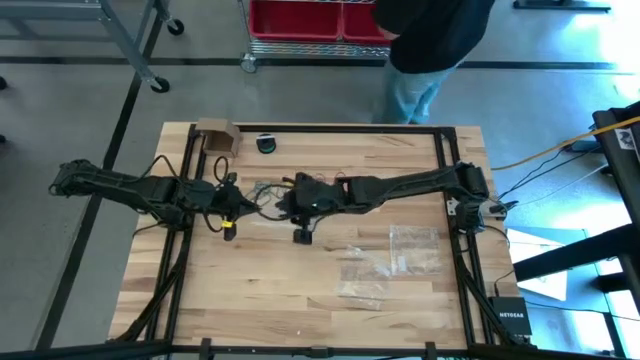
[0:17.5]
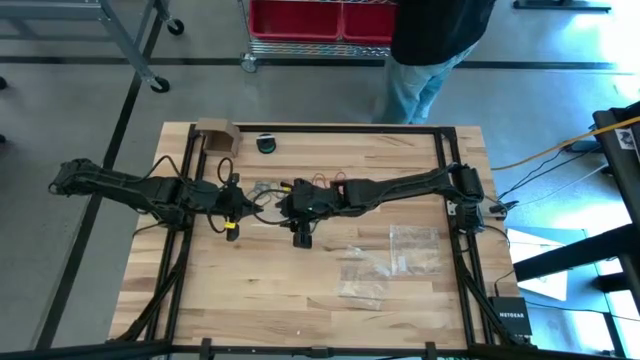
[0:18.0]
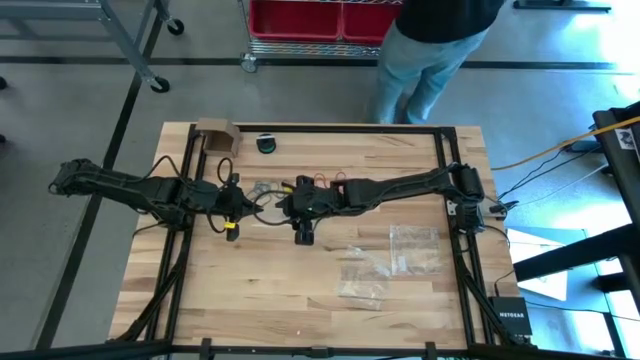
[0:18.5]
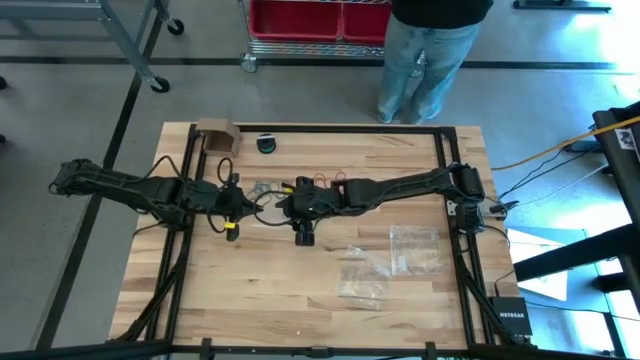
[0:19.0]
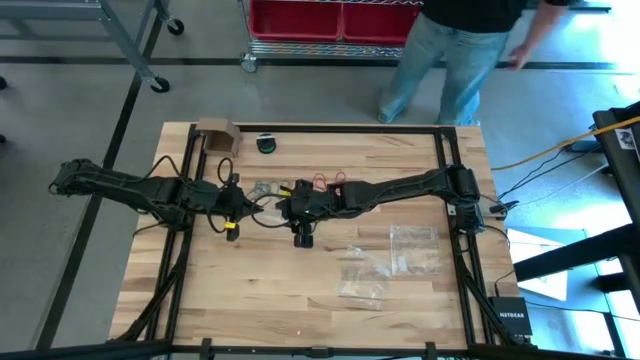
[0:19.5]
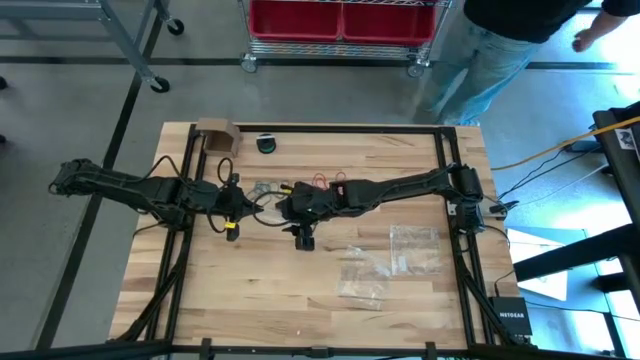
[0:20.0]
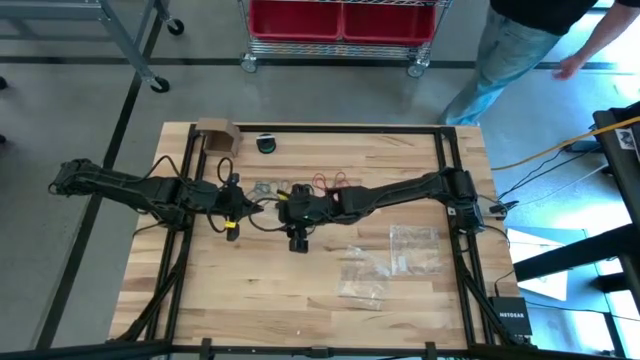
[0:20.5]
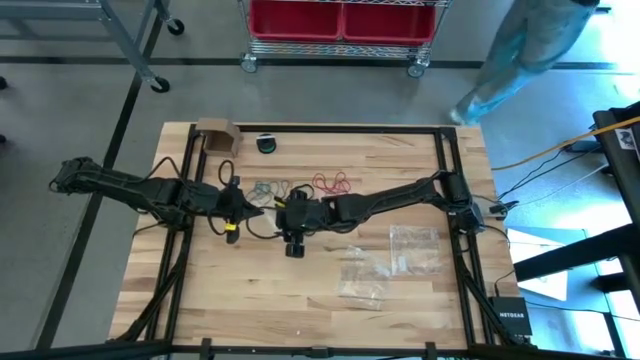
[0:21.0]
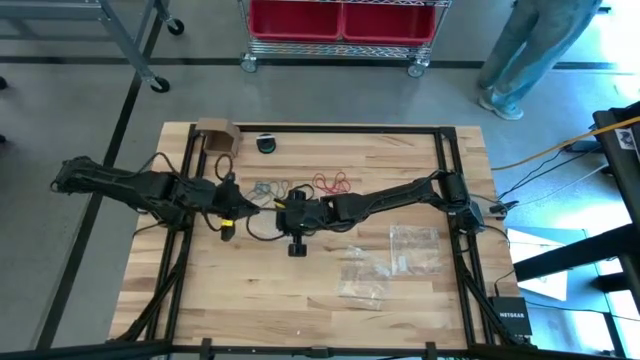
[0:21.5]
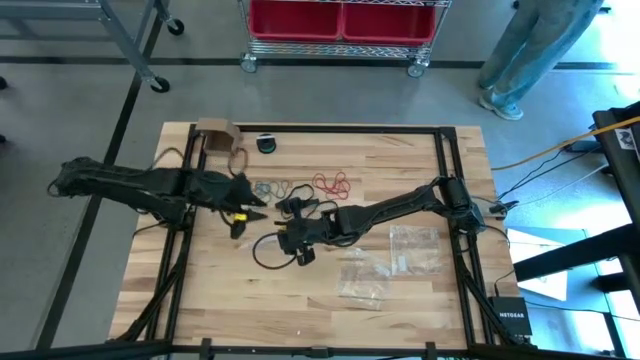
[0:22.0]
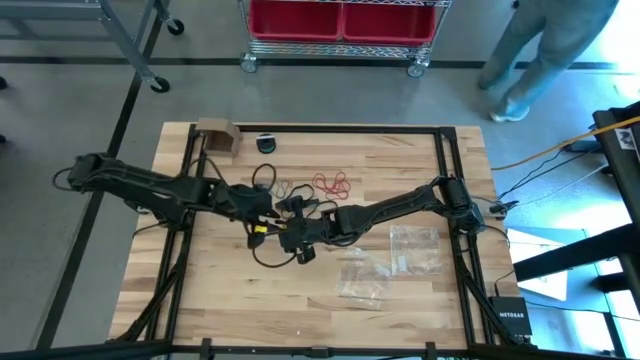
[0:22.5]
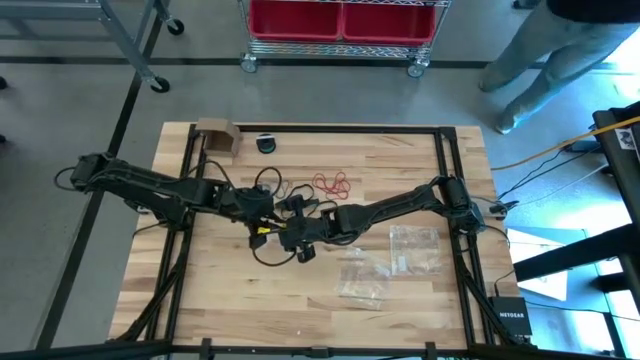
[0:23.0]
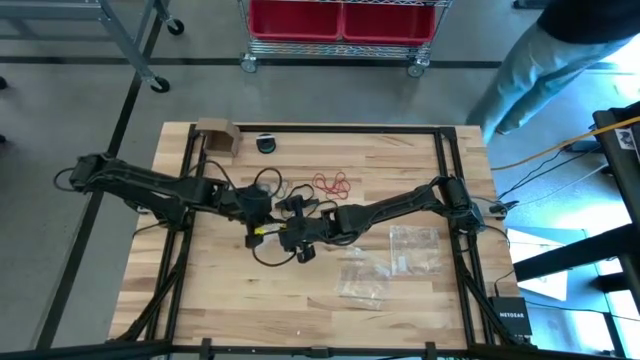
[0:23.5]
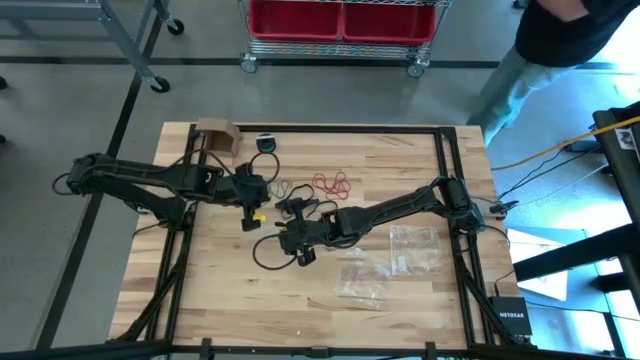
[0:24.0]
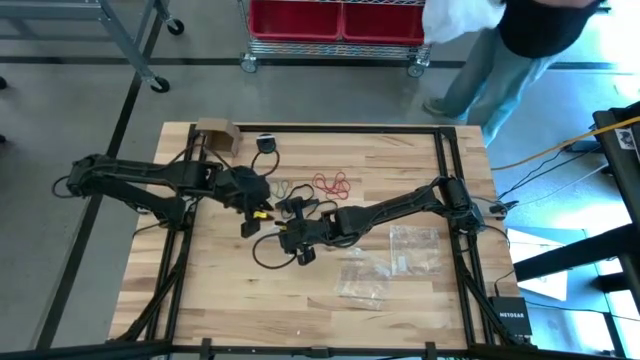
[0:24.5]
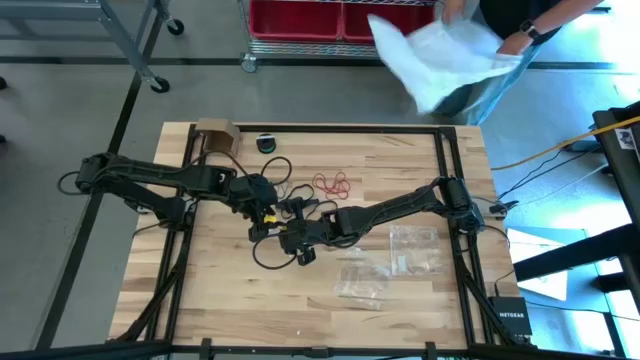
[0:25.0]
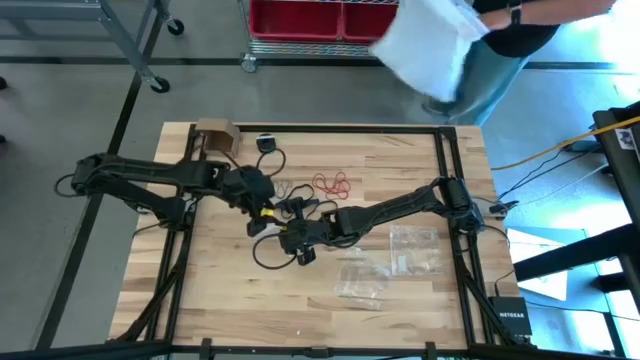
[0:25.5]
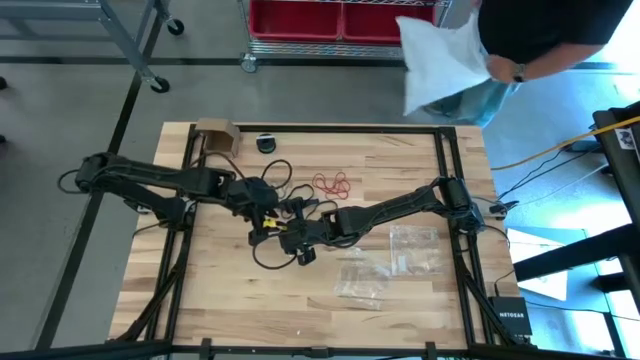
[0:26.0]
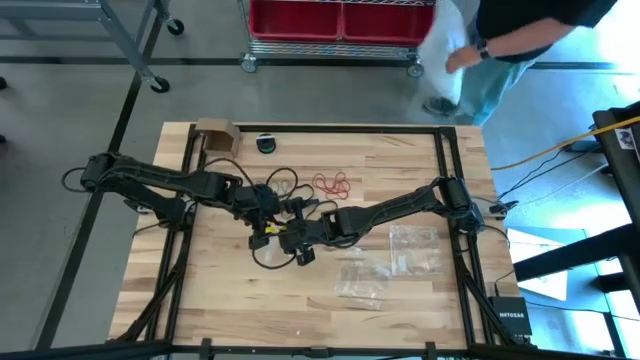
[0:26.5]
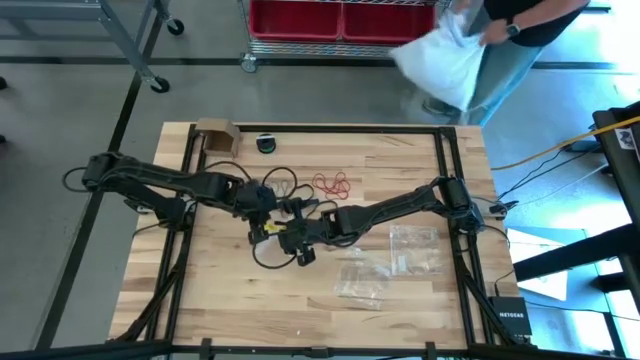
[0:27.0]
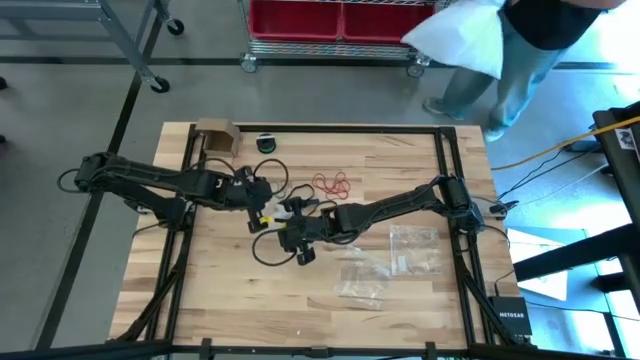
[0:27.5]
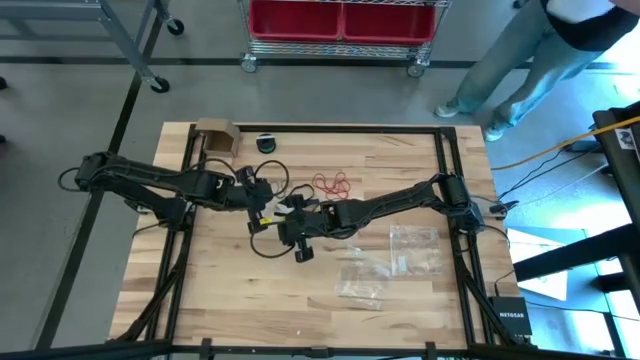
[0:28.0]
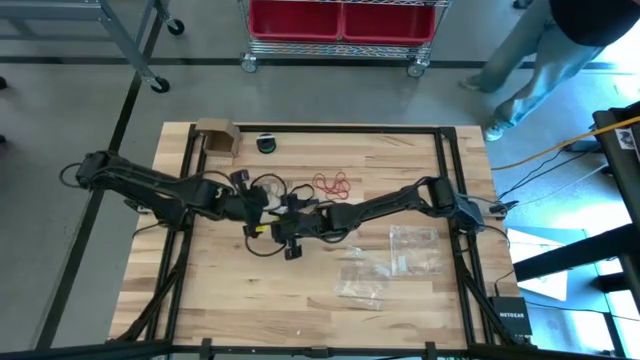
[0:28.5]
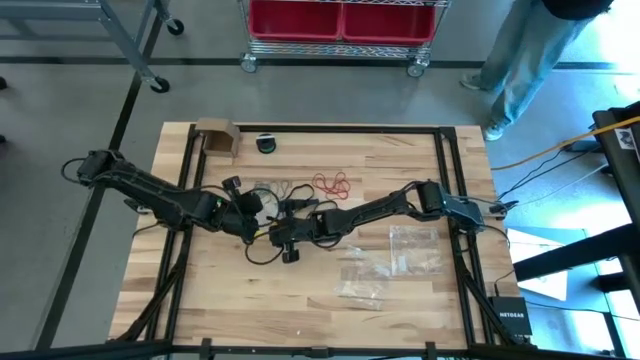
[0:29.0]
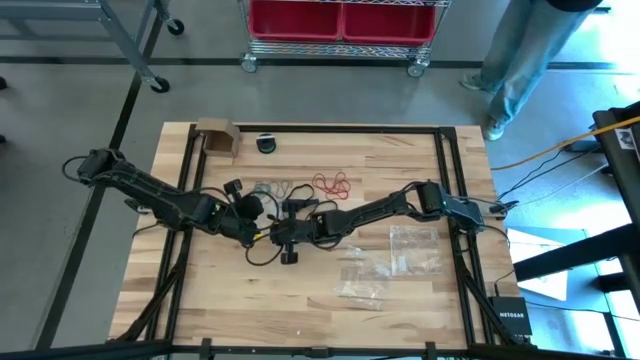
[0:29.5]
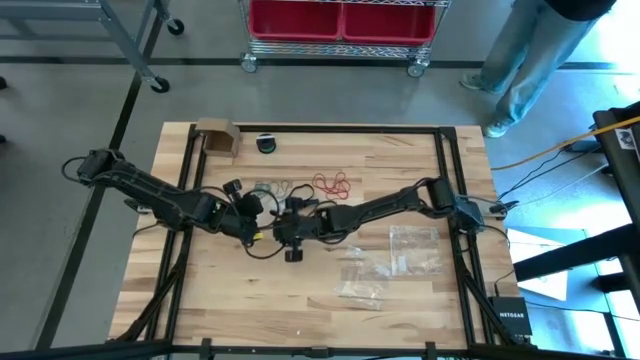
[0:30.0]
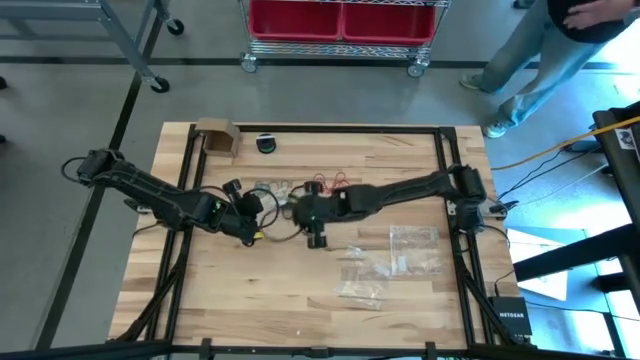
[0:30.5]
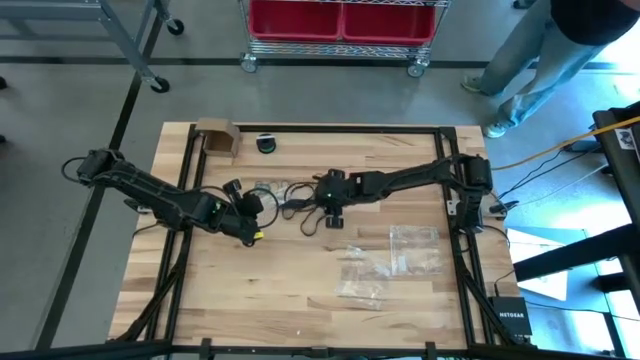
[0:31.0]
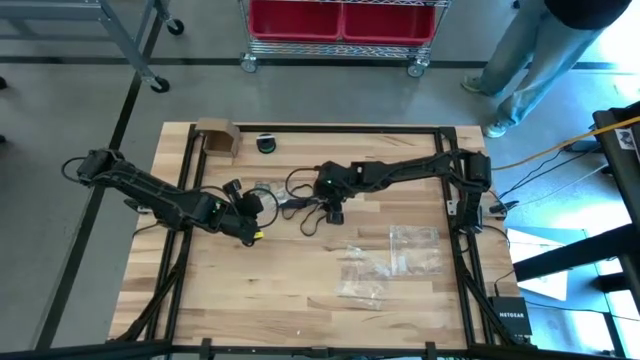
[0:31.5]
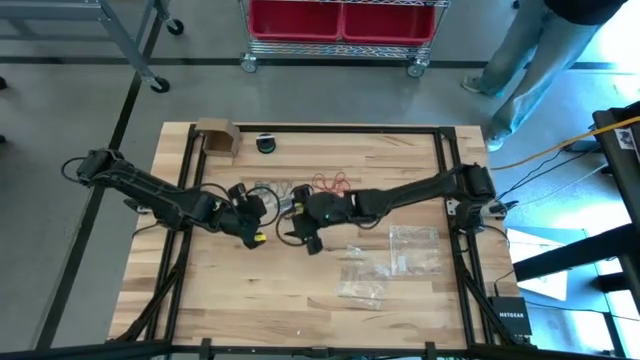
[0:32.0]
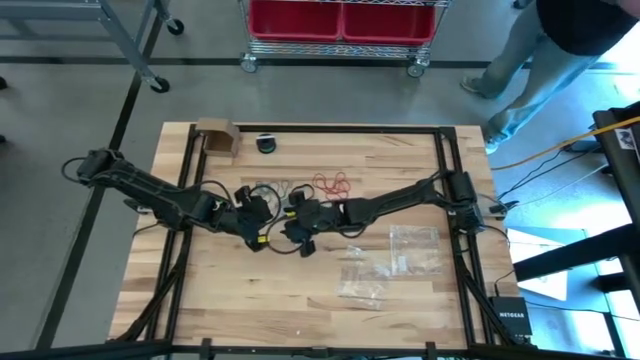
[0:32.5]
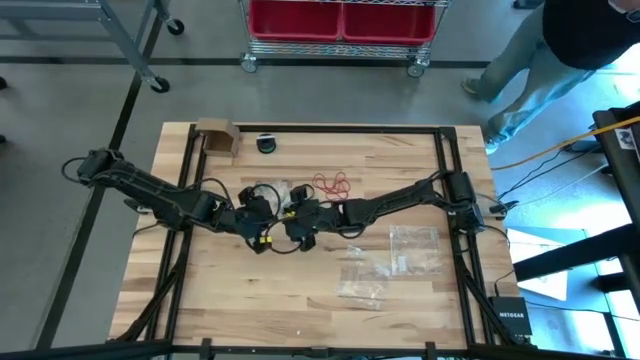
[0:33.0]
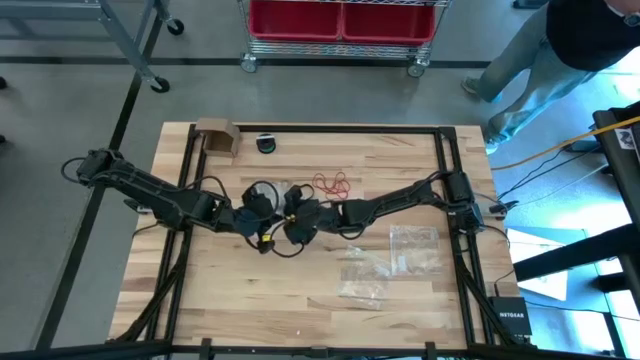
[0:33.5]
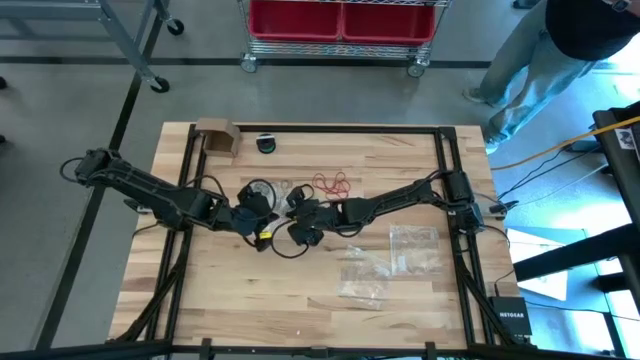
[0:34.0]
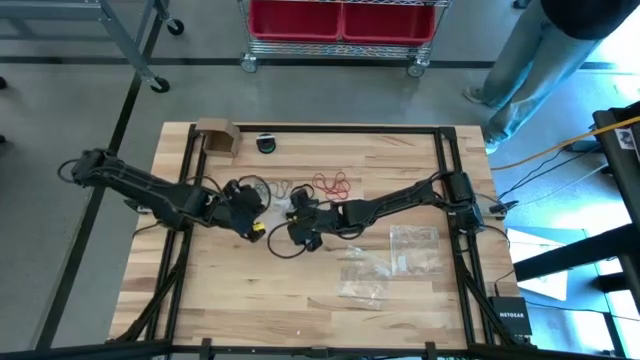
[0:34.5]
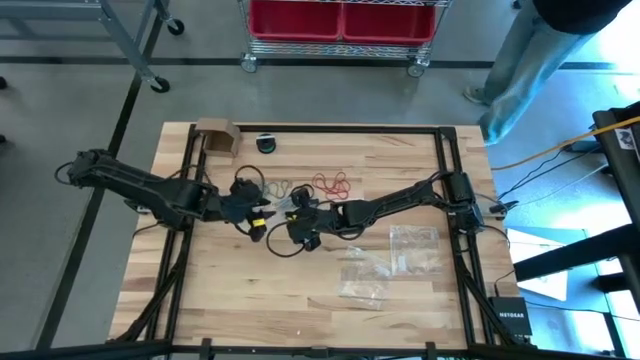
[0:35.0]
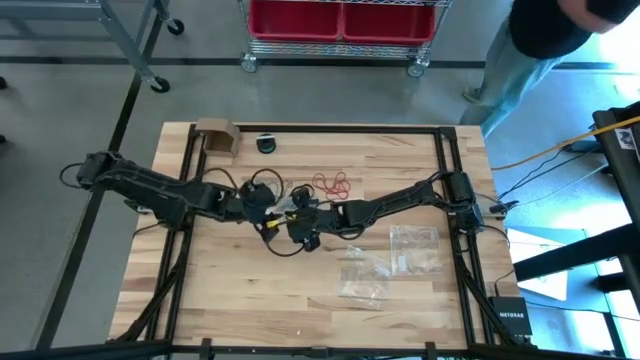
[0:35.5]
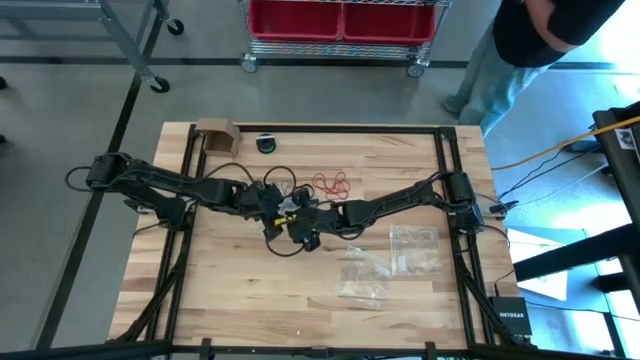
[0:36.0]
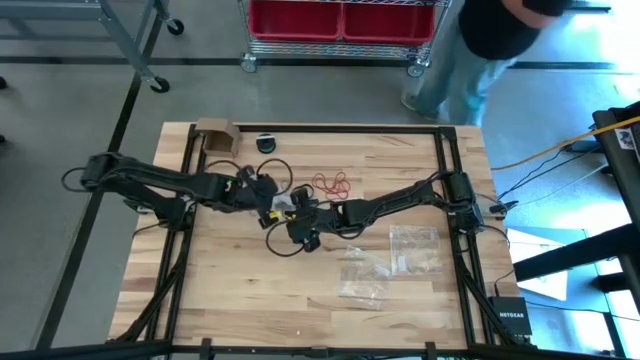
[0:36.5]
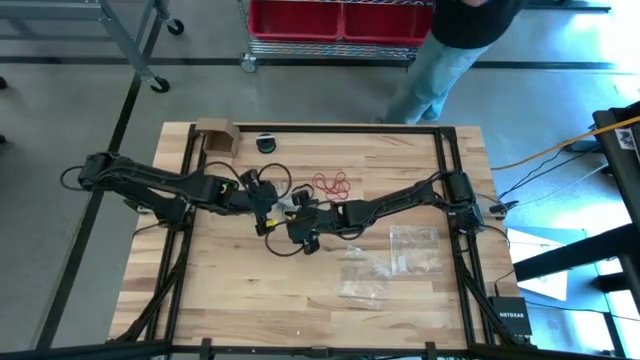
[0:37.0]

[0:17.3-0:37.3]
Task: Sort rubber bands
Put the black rubber band into the transparent zip bag

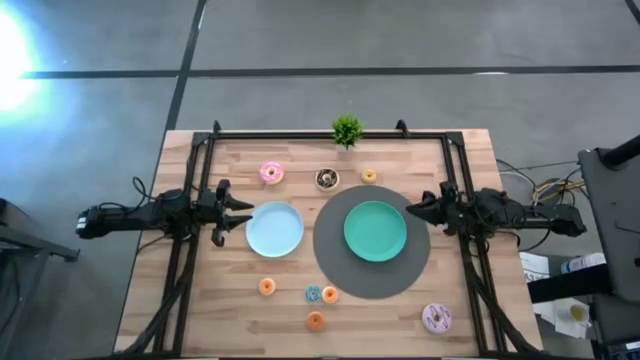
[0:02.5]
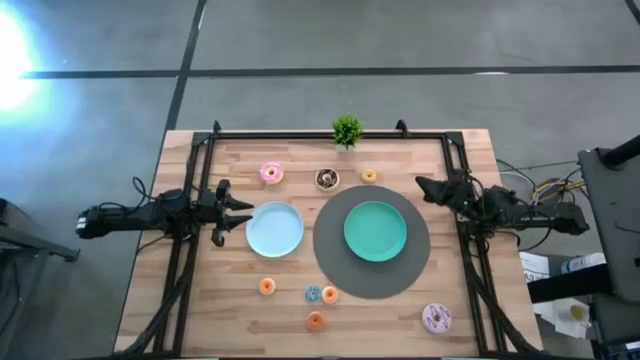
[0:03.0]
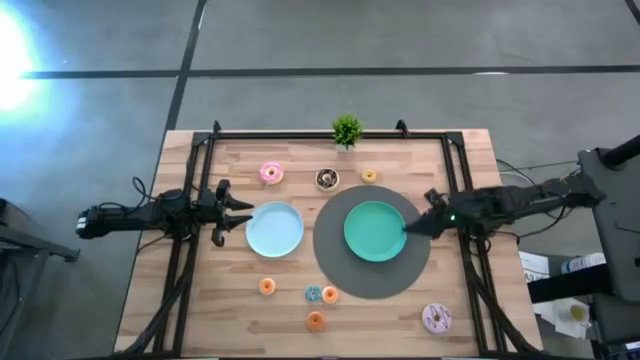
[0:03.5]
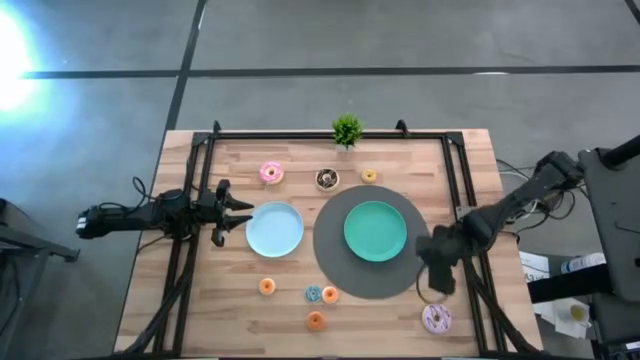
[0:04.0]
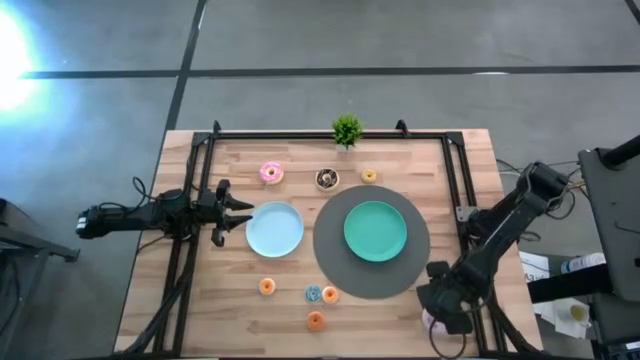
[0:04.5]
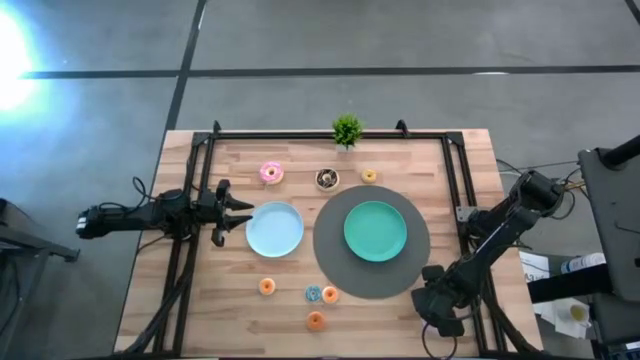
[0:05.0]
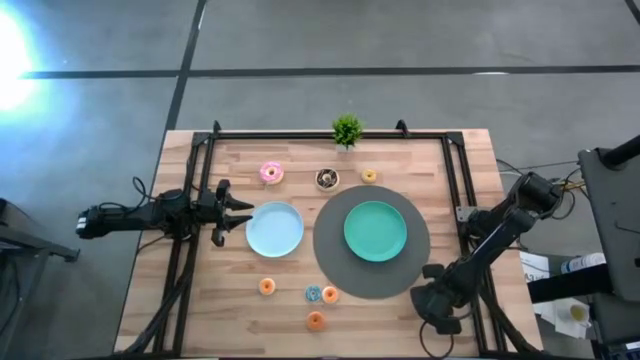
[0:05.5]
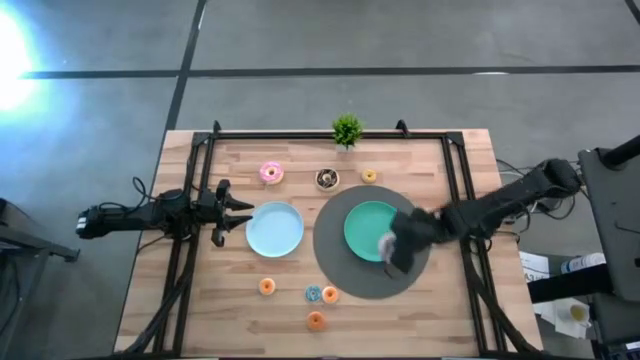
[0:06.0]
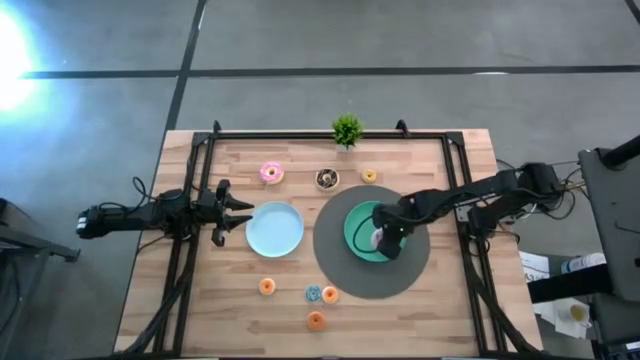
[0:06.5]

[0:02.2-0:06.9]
Task: Pick & Place donuts
Put the large purple donut on the green plate
